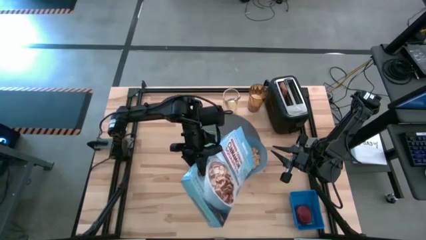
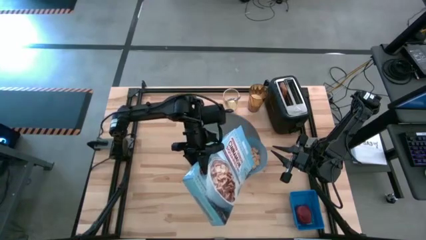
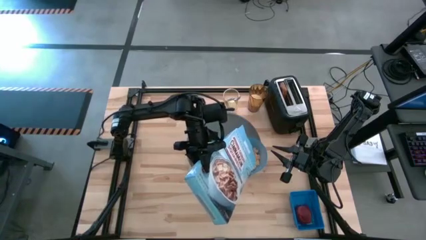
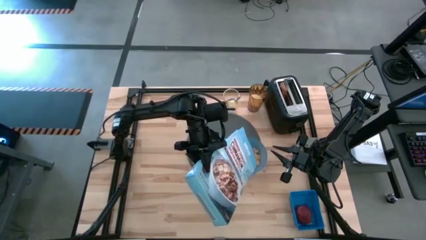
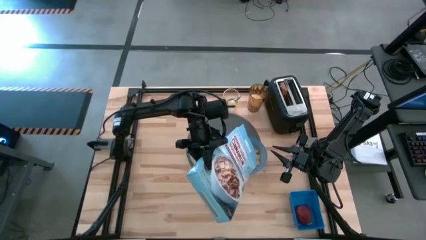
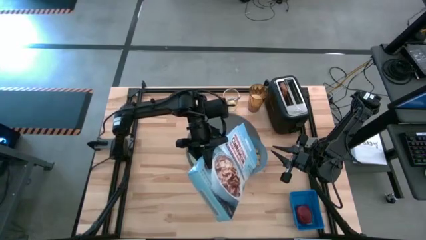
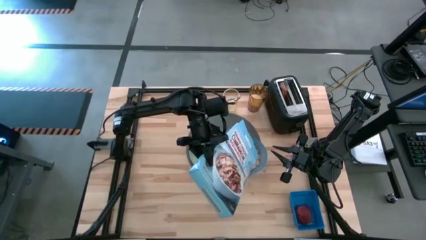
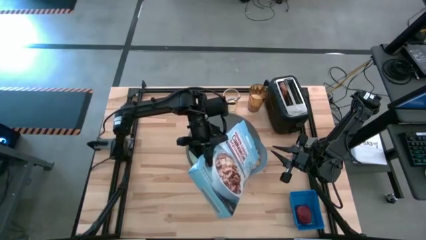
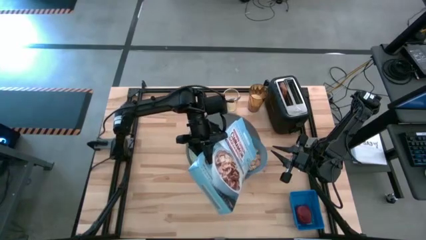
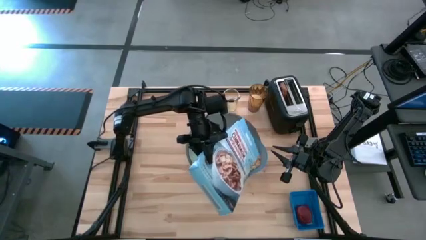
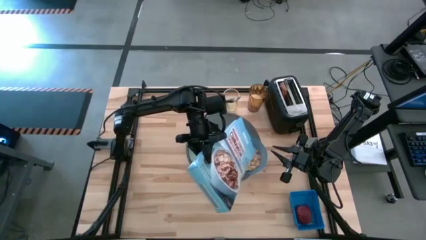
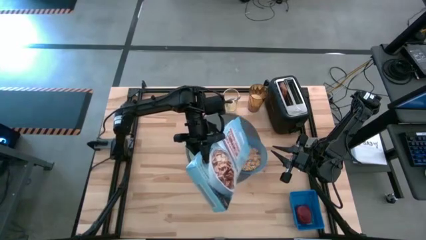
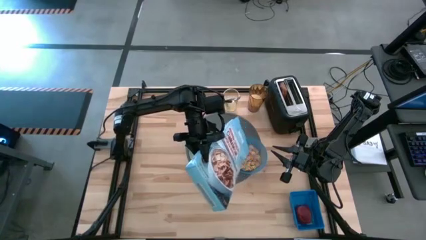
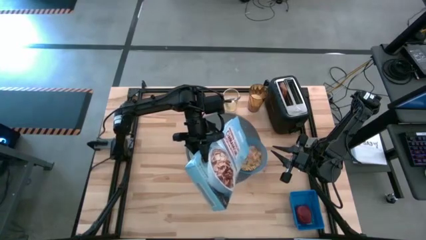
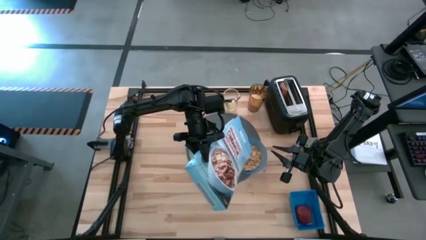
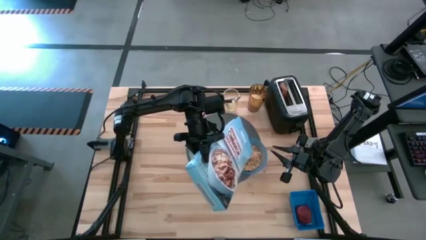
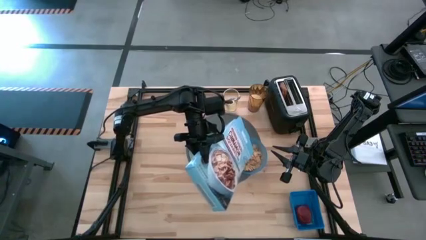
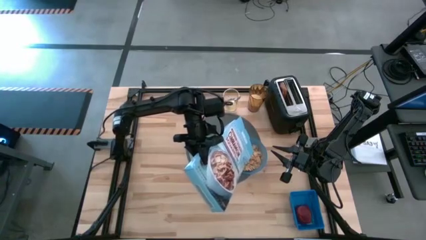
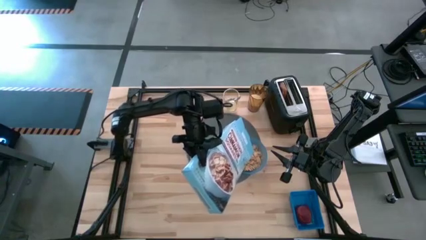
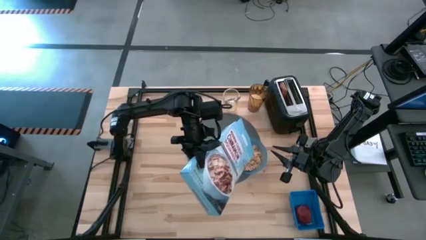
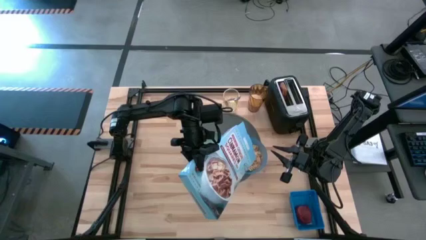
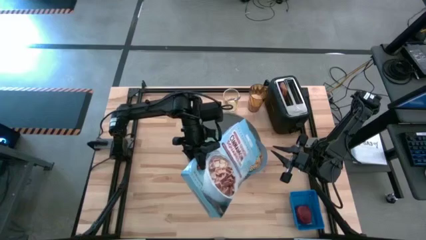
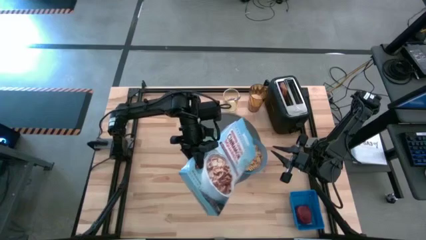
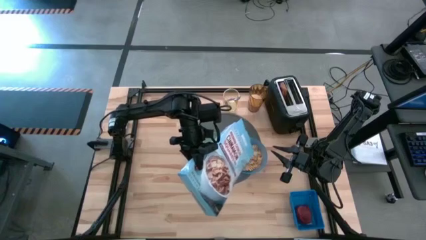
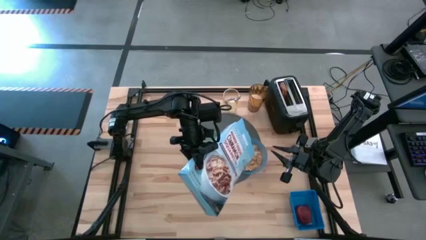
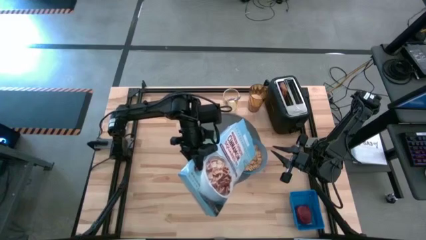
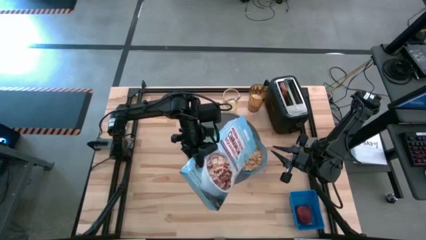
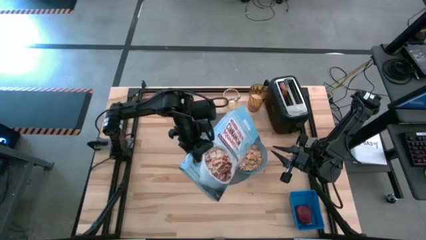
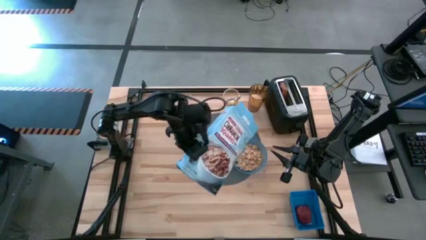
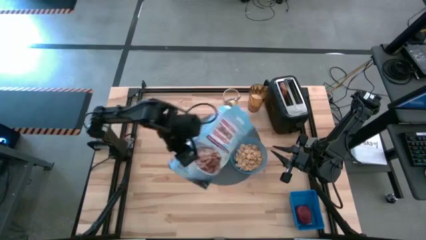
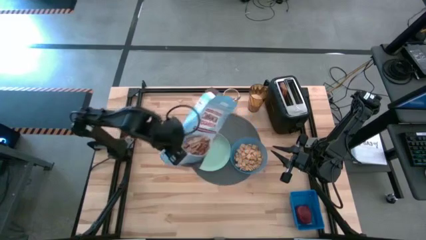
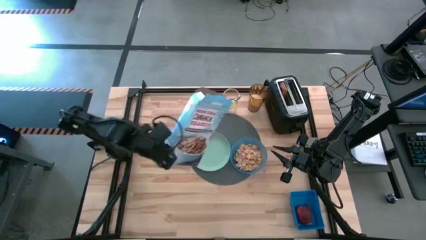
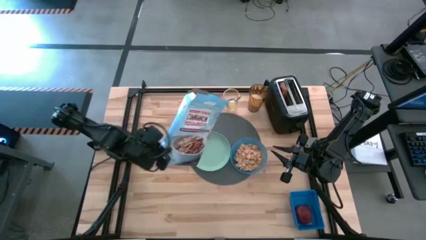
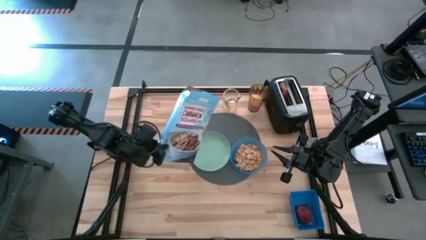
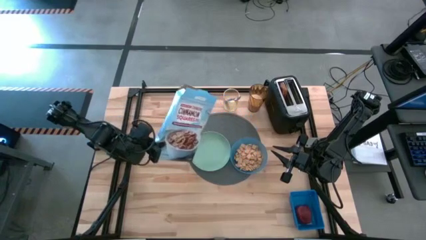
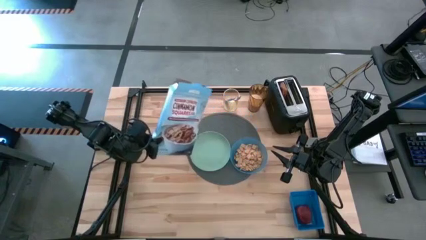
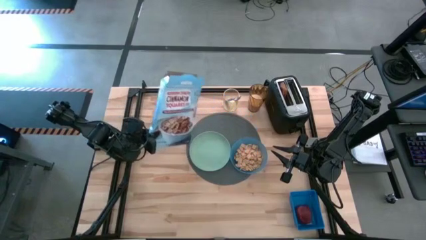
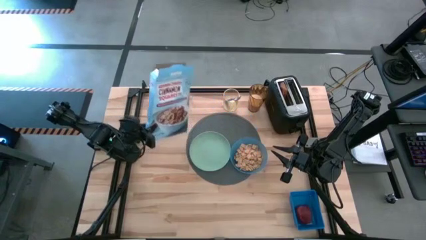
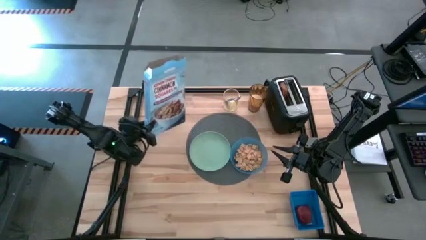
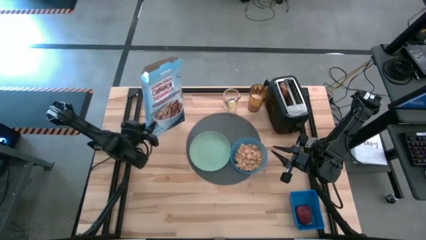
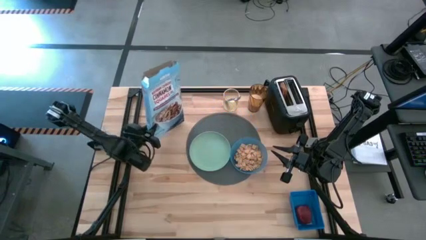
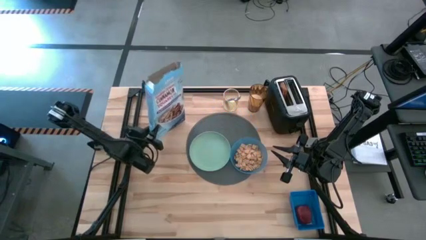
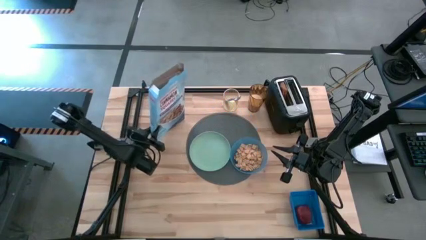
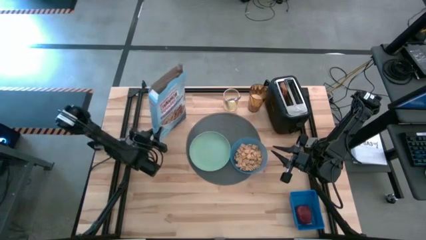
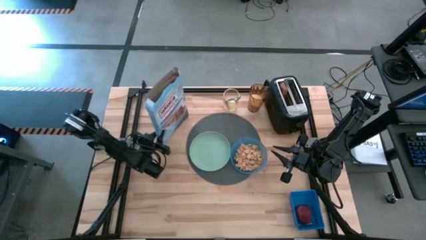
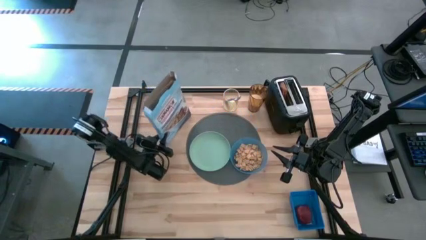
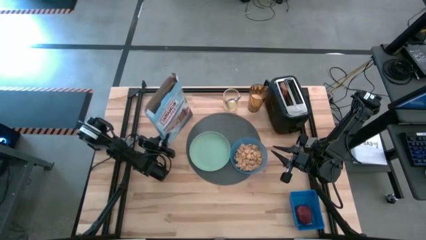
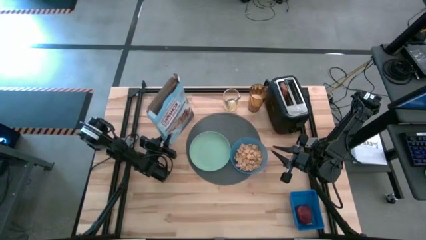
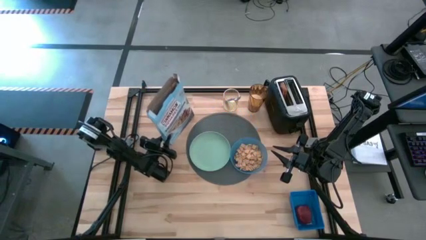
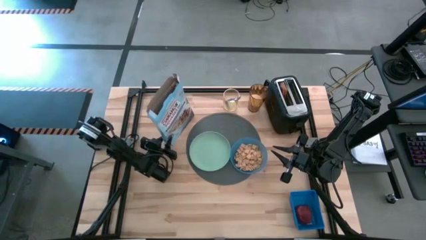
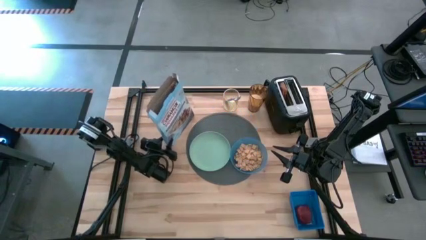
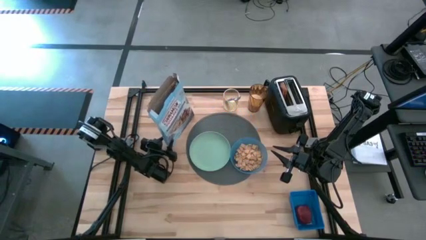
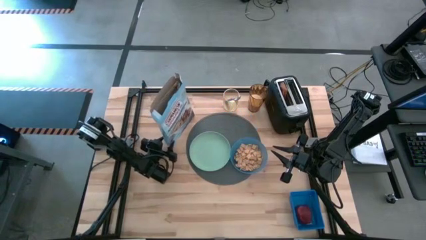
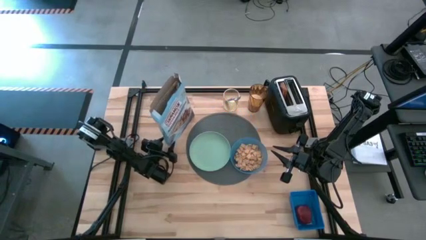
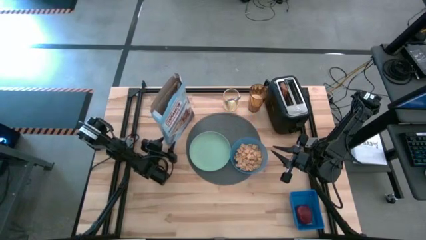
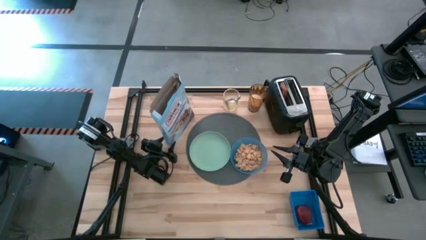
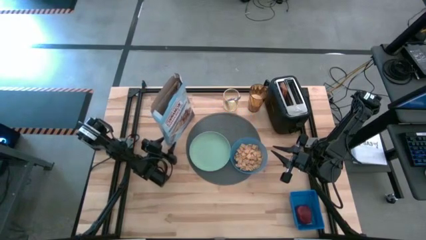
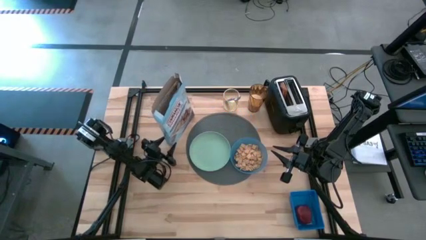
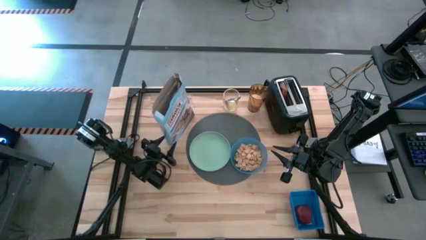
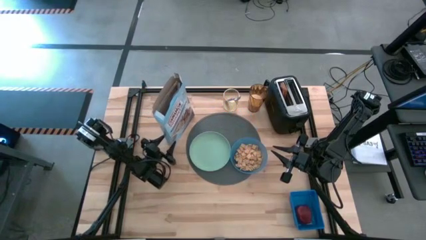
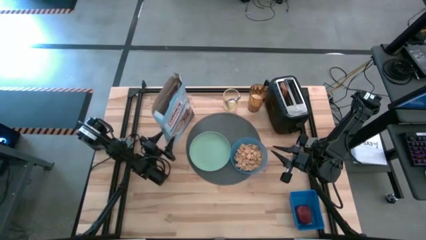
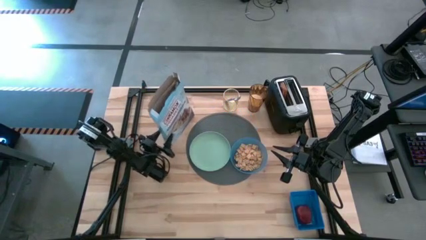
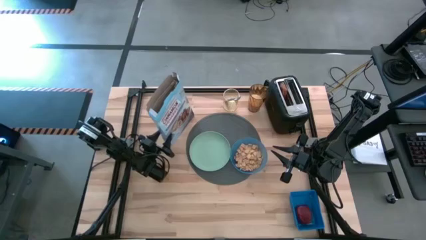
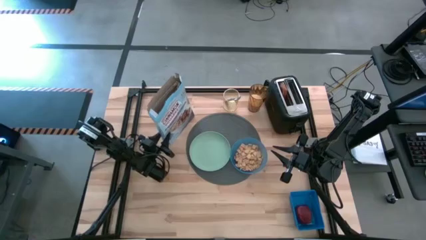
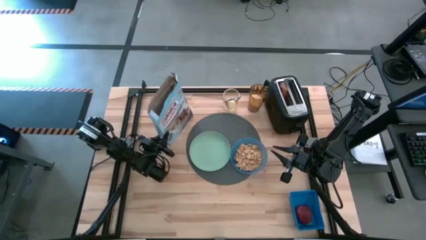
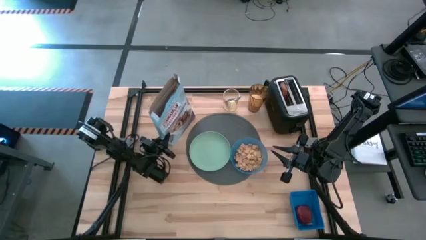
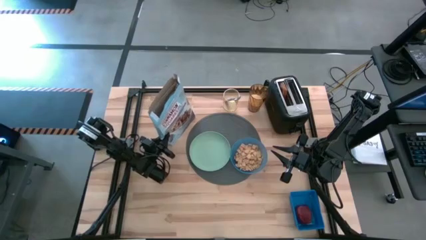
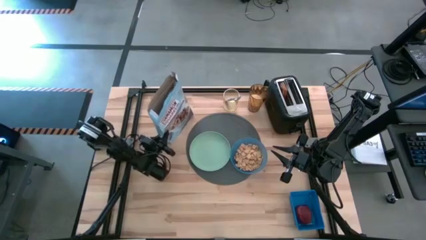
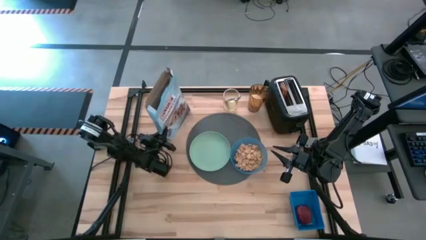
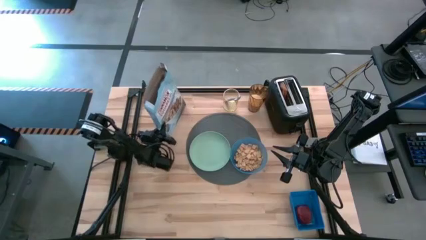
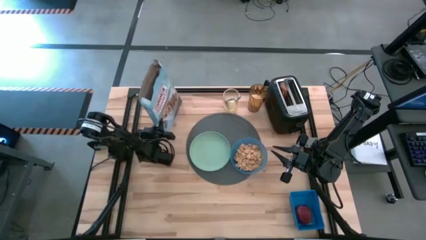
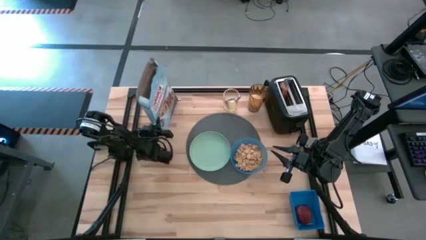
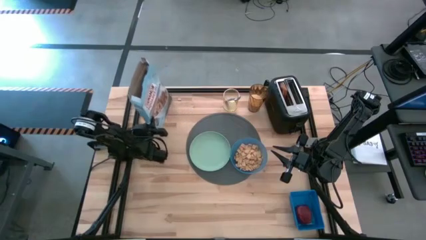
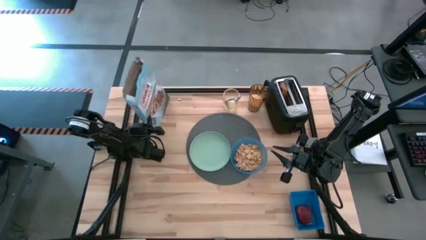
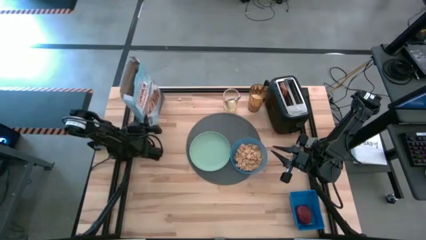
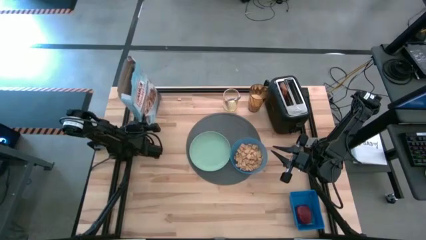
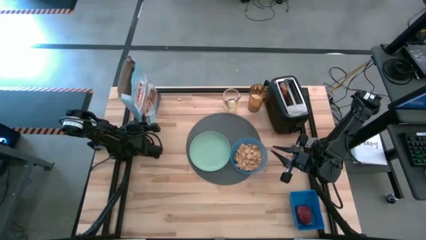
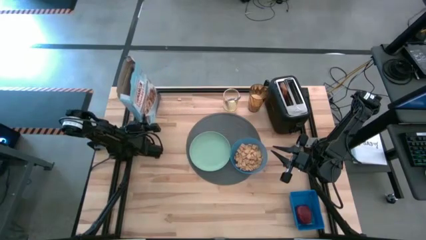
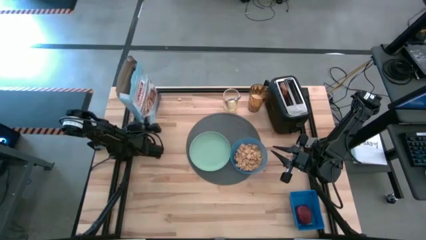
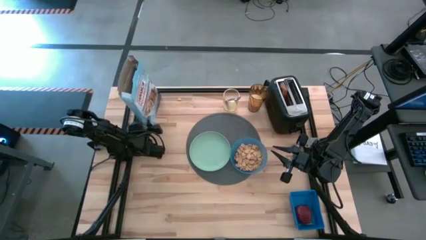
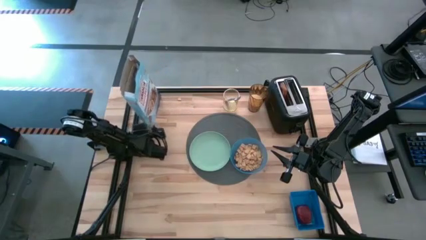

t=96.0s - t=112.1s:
Task: Arrange a breakfast setting
Pour the cereal from the cereal box into the blue bowl
